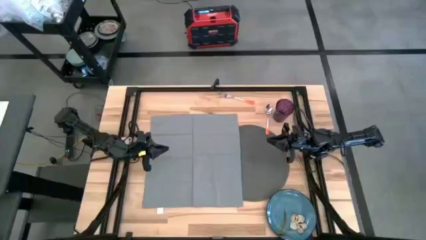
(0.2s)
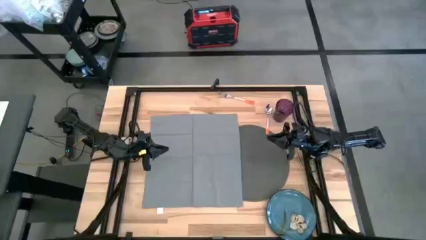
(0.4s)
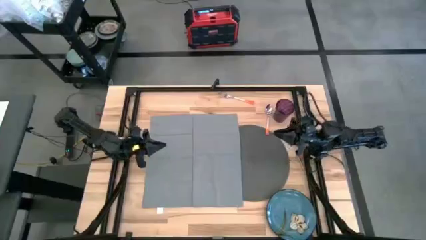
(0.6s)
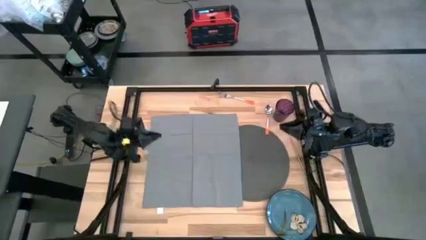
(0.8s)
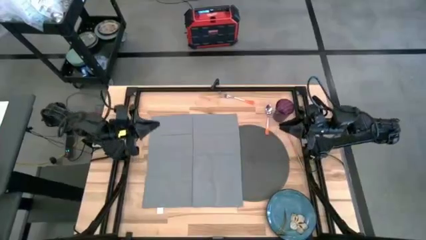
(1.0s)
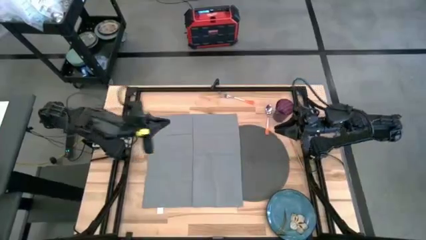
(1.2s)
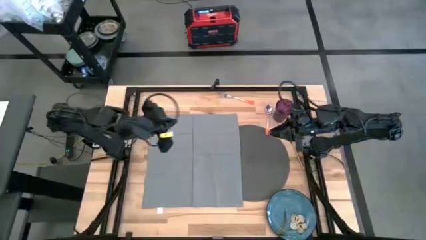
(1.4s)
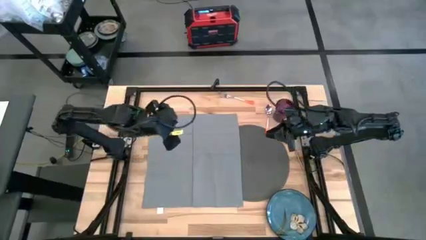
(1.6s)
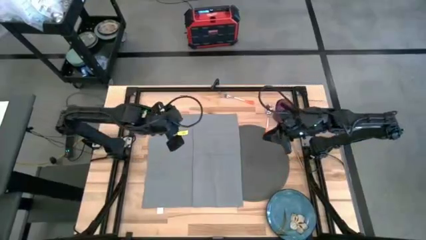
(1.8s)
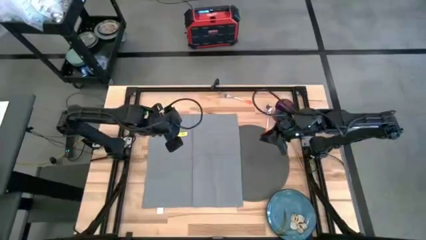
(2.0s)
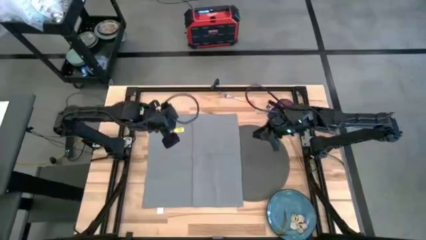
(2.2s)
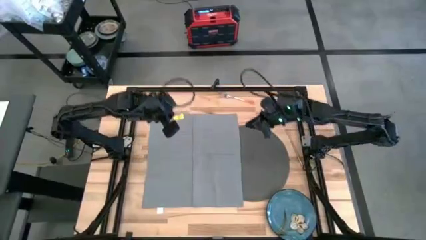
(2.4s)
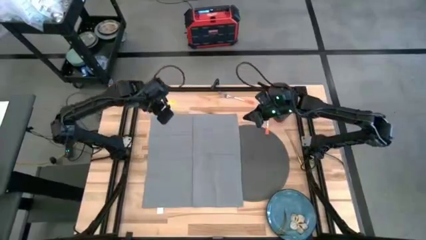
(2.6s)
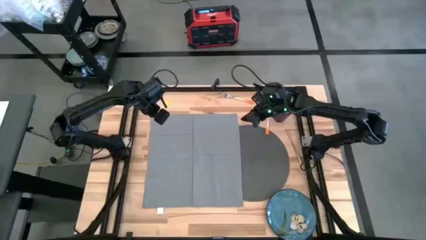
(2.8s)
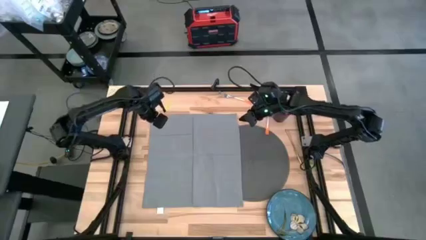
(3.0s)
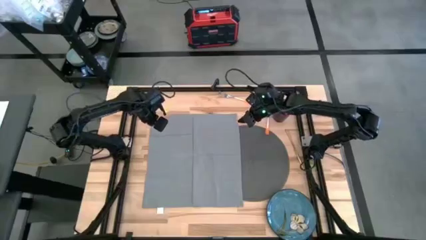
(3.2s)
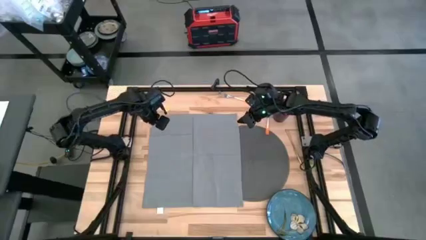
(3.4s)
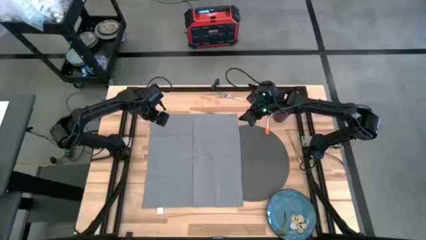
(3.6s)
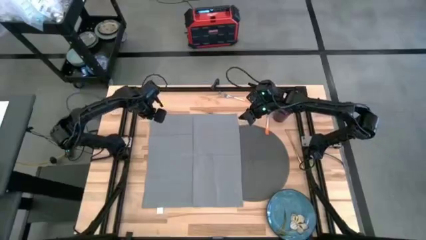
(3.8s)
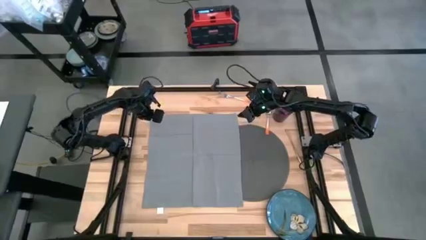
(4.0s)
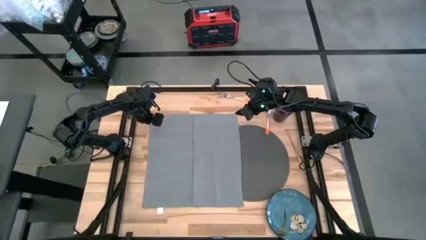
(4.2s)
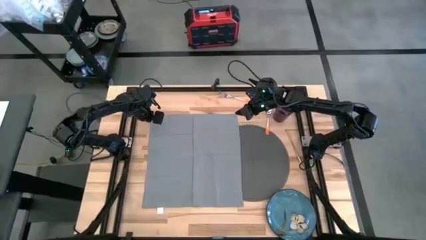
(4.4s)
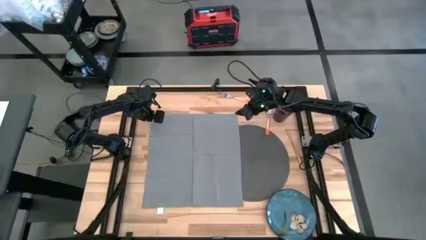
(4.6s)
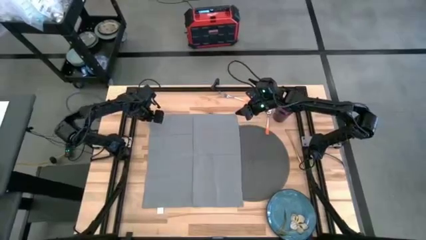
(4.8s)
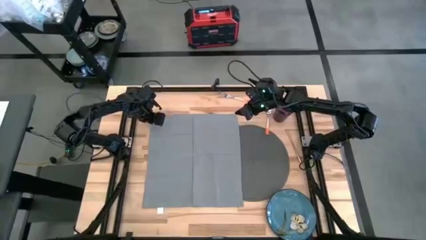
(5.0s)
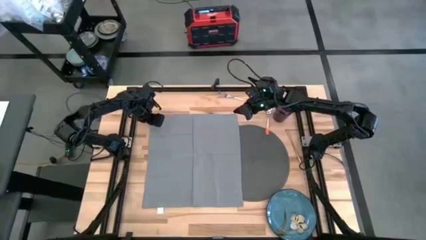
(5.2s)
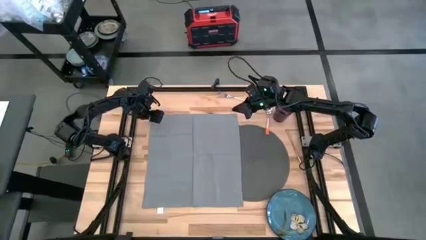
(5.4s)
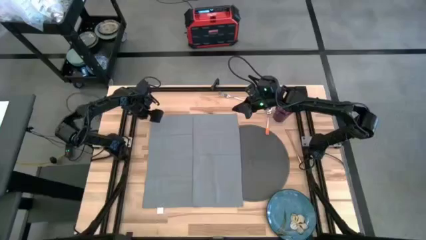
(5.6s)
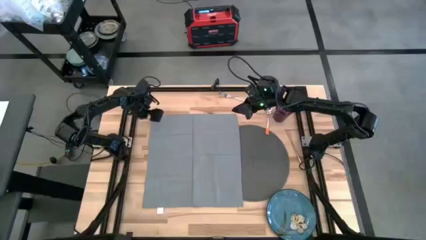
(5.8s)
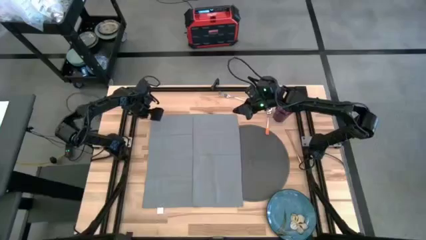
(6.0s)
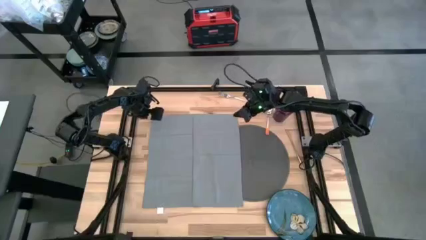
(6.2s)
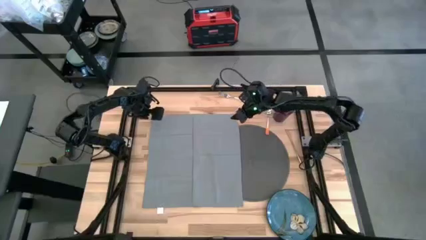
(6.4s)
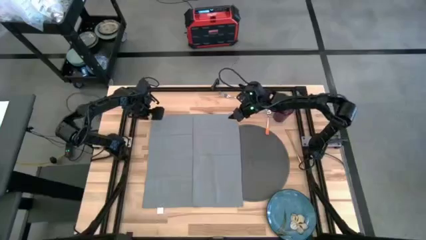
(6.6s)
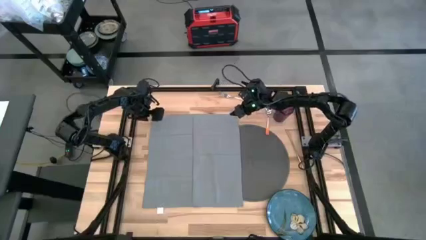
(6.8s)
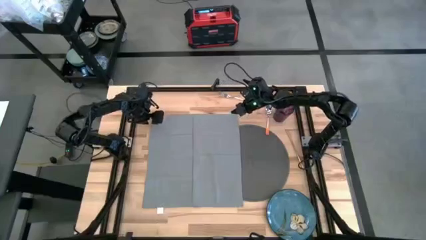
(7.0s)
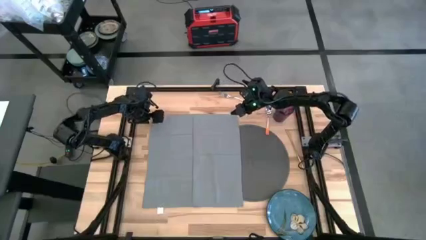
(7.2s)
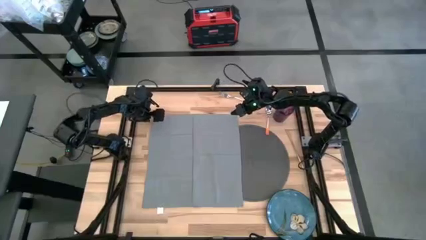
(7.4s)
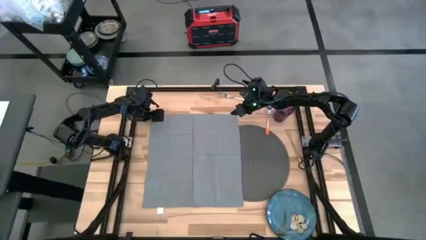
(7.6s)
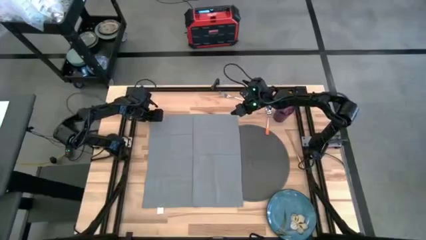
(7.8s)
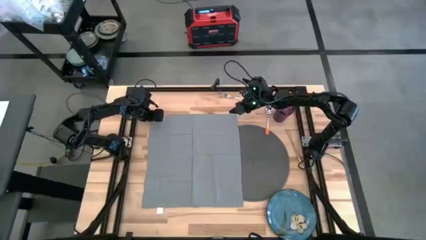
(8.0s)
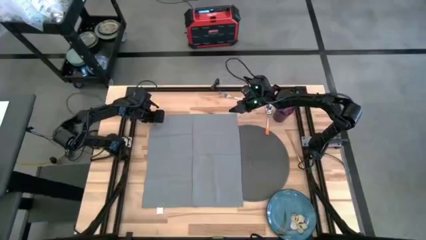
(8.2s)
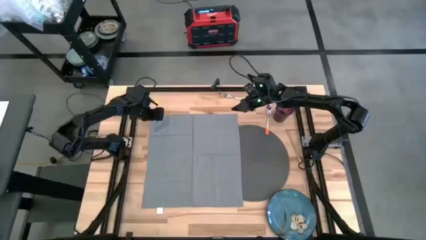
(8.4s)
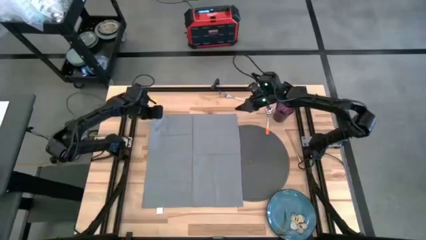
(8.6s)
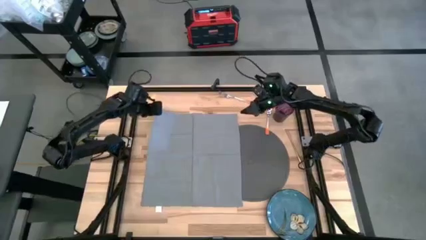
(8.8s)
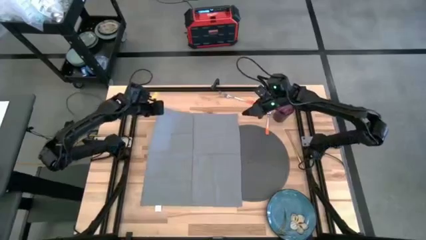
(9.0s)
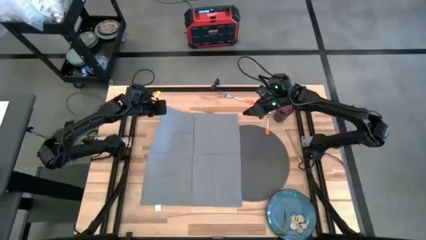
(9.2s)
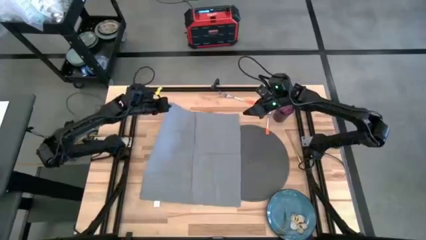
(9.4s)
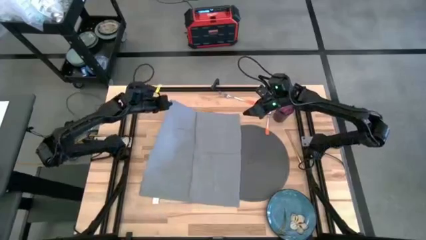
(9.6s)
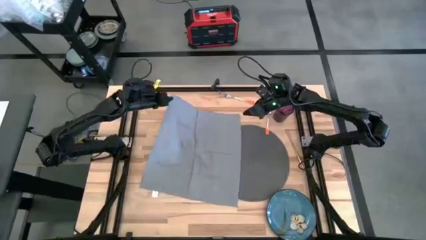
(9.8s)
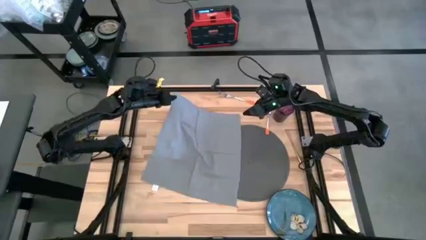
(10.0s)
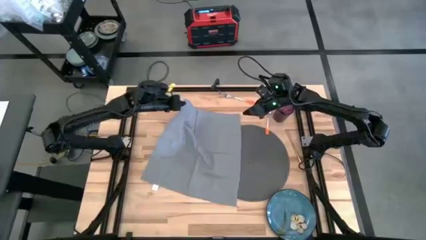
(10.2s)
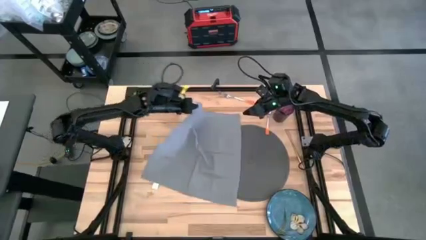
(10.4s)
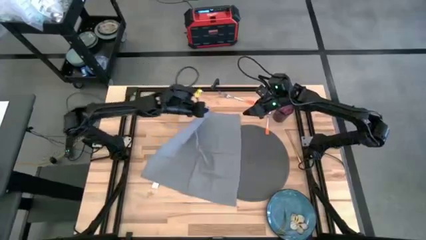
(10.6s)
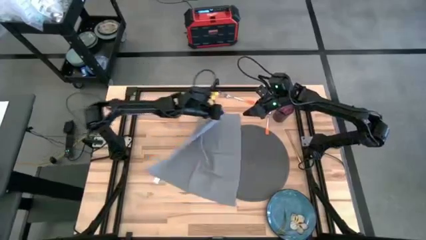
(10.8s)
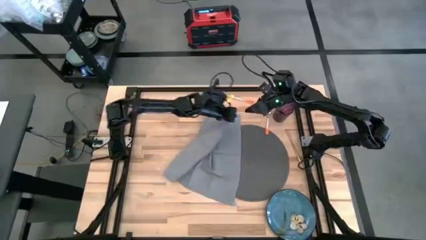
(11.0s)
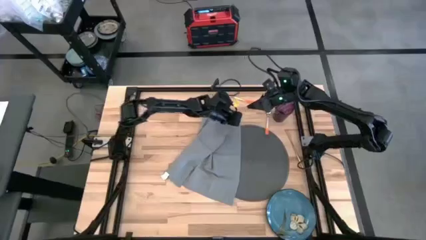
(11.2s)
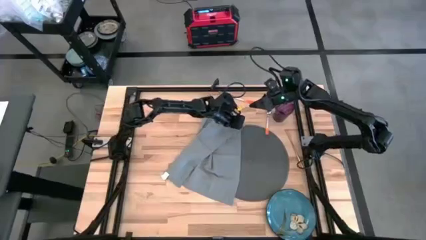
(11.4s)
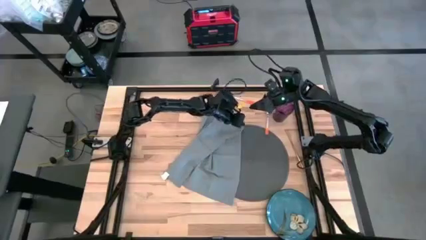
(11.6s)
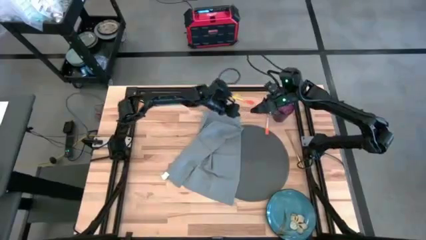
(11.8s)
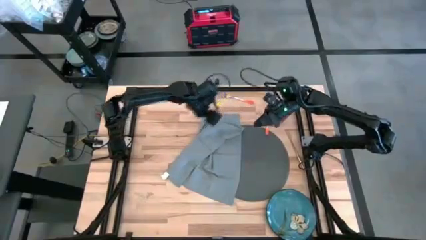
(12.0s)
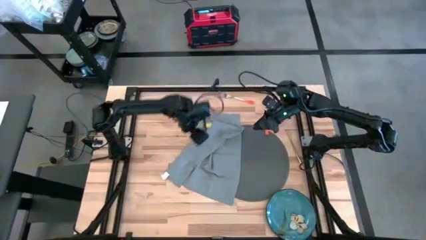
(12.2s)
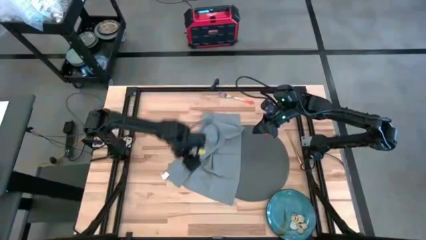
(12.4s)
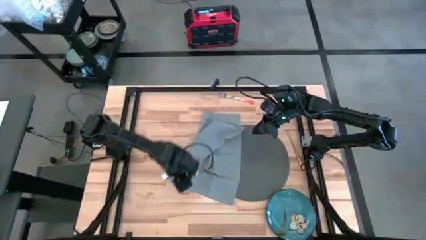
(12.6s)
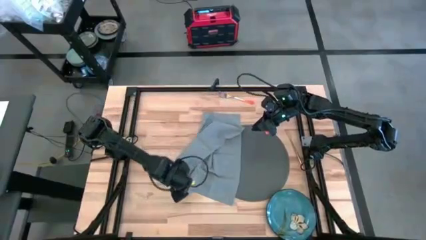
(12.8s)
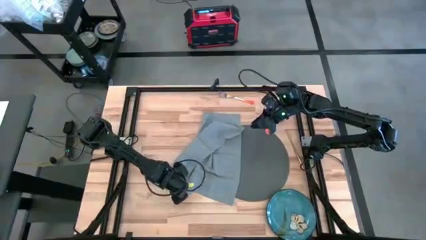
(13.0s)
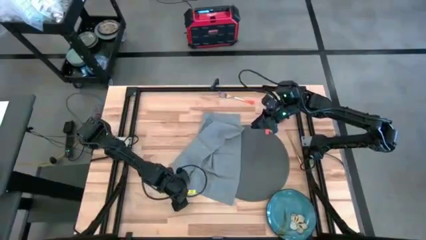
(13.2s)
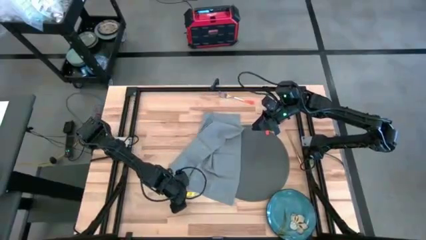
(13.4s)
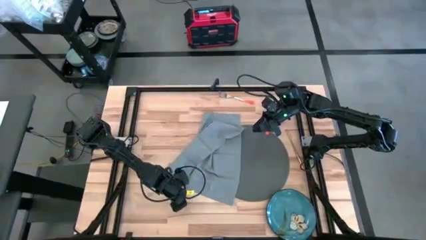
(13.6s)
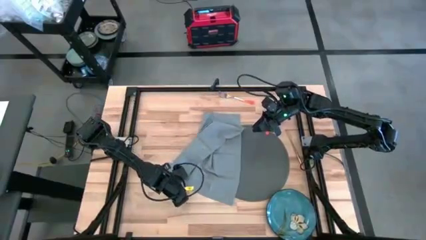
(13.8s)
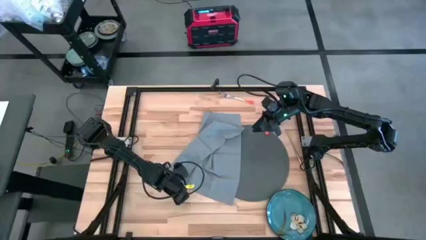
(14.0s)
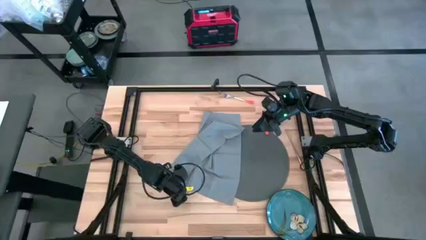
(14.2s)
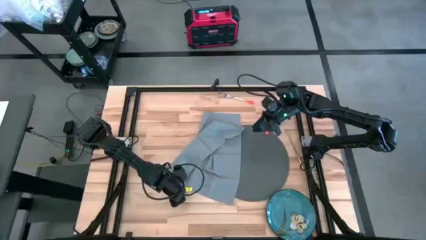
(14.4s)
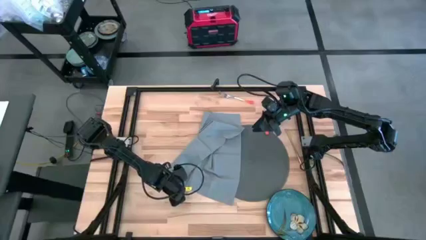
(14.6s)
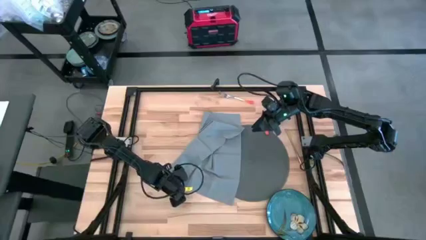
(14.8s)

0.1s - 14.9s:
Task: Set table place
Fold the light gray table napkin on the table
